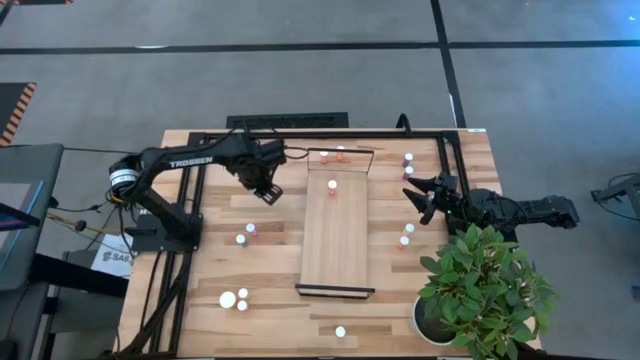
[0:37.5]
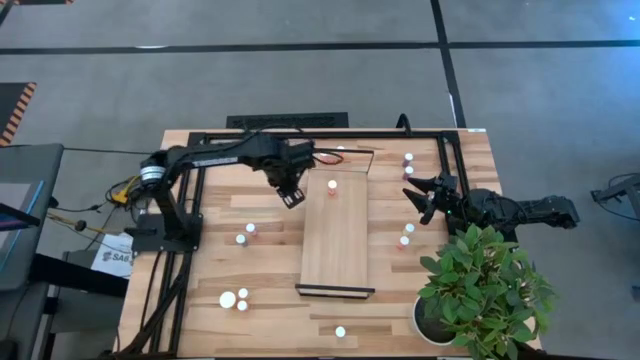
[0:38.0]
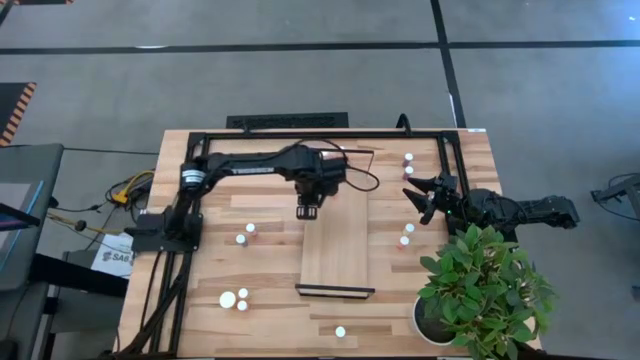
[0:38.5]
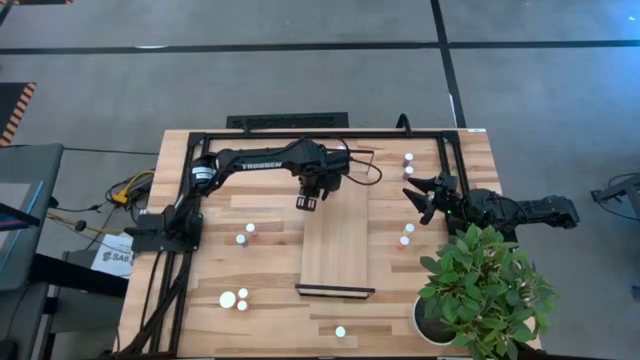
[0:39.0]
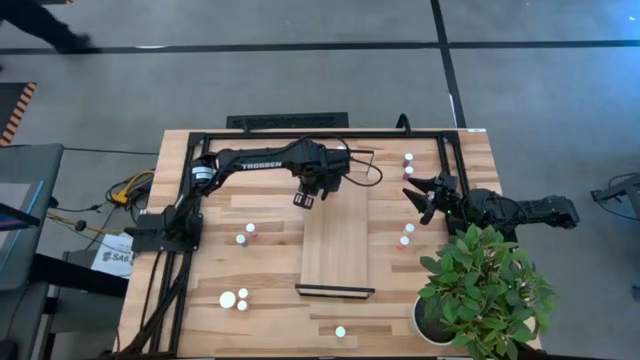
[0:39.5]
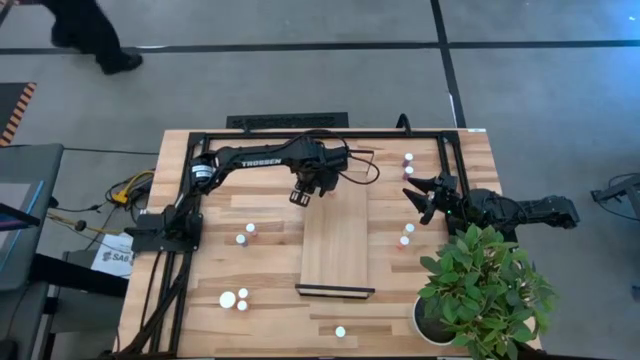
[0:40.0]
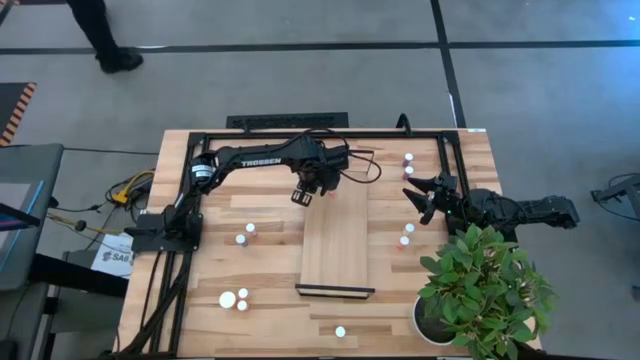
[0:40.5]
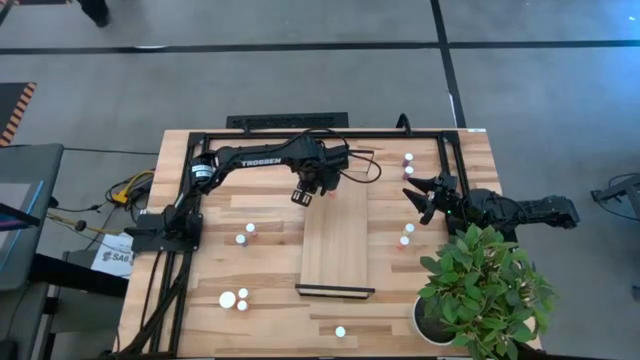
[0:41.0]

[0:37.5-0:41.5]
Task: Pick and place medicine bottles onto shelf by color
Put the yellow pill bottle on the shelf

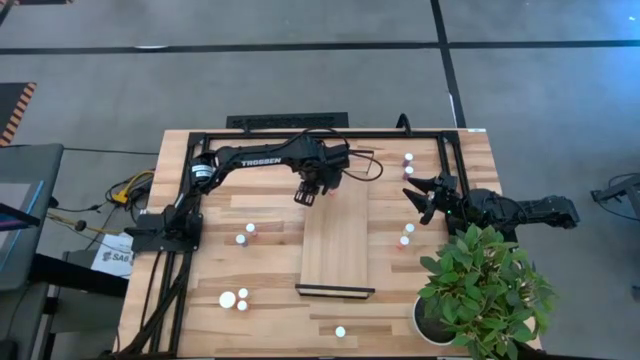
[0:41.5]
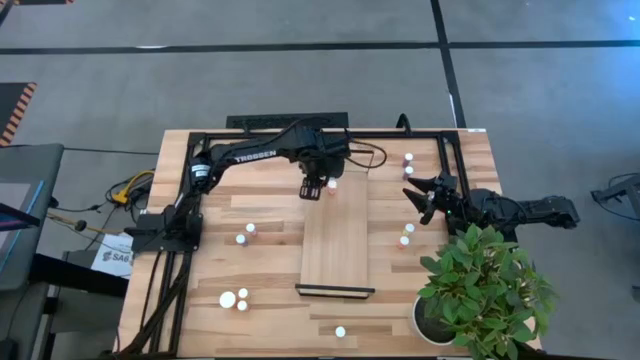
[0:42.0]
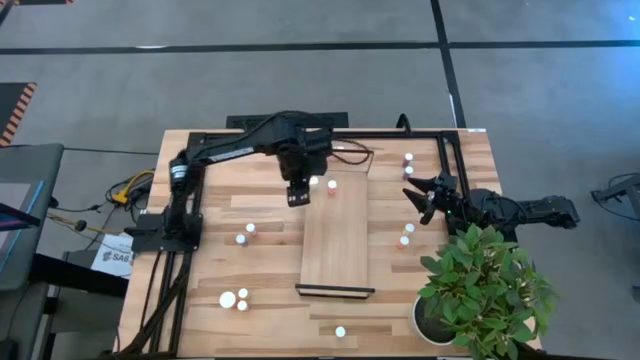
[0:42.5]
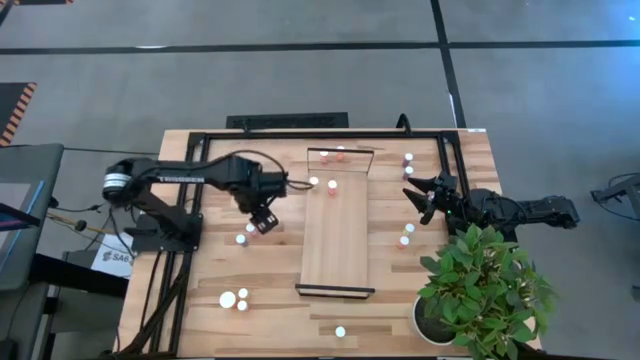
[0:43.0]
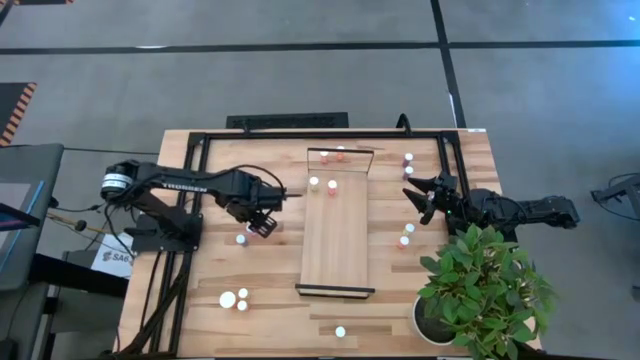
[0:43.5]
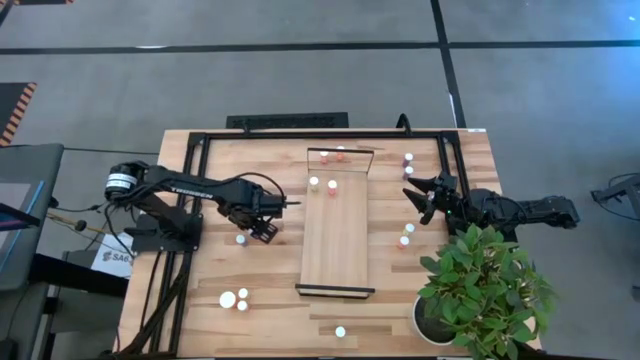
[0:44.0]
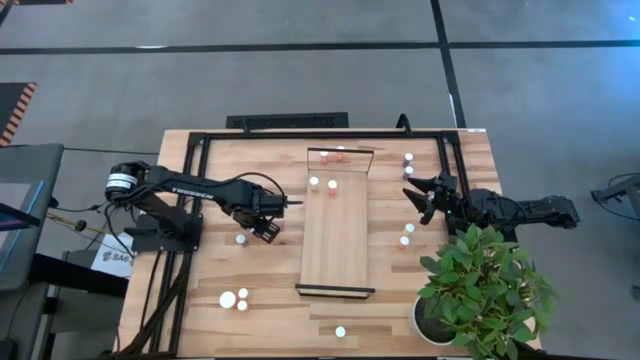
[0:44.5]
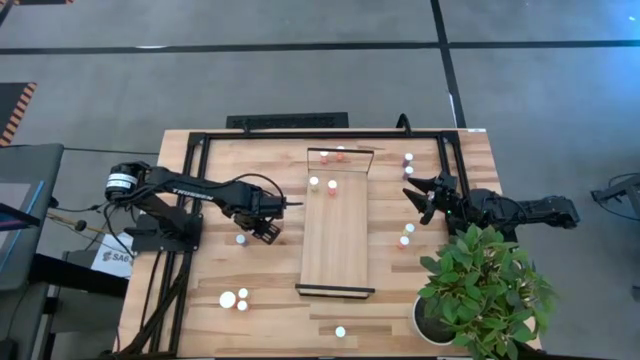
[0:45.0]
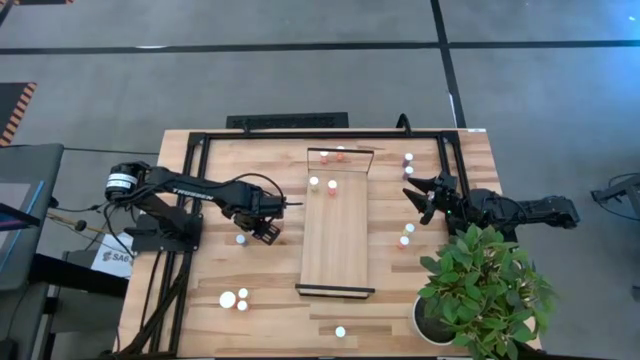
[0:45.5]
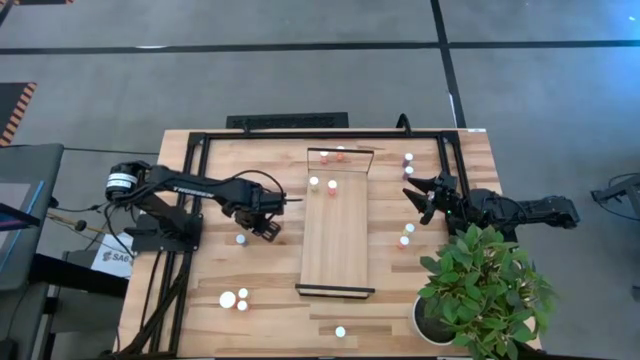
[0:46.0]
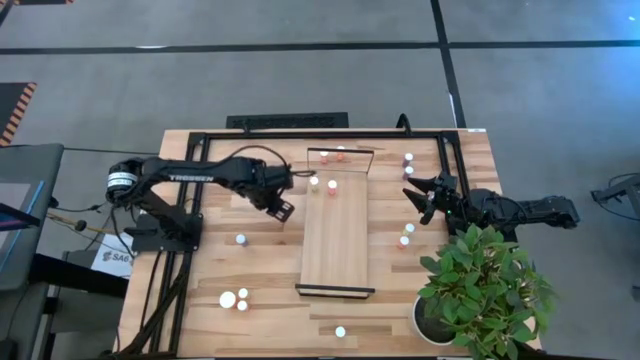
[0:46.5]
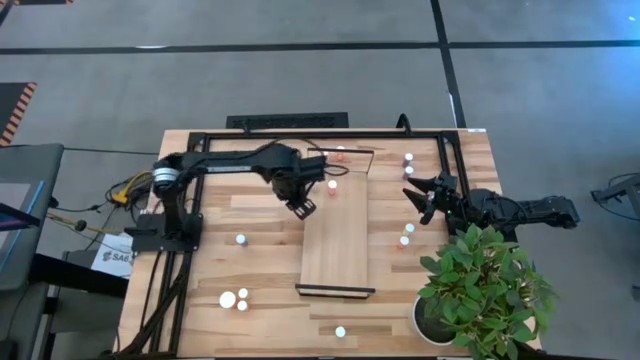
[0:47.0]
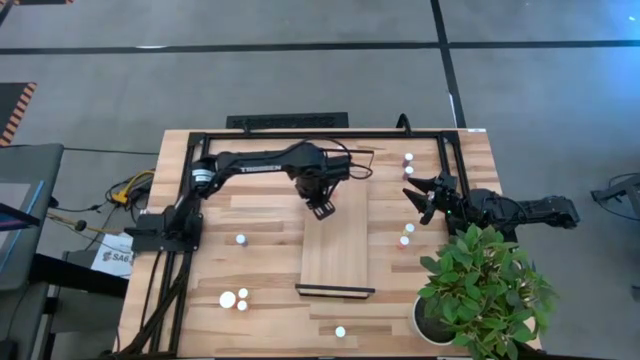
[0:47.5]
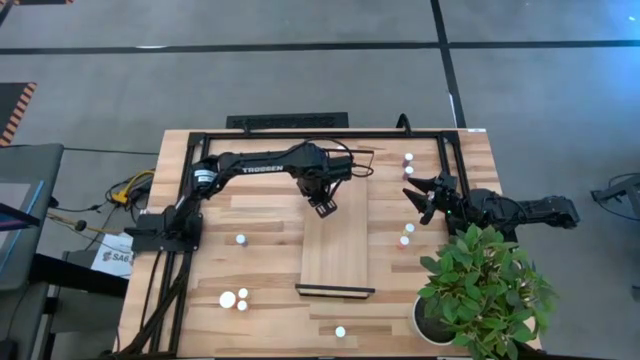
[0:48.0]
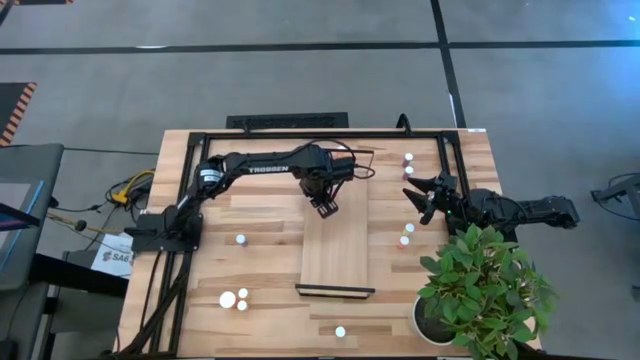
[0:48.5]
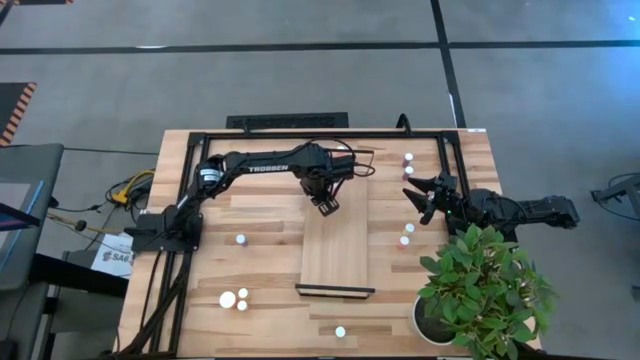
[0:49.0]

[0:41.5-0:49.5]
Put the pink pill bottle on the shelf

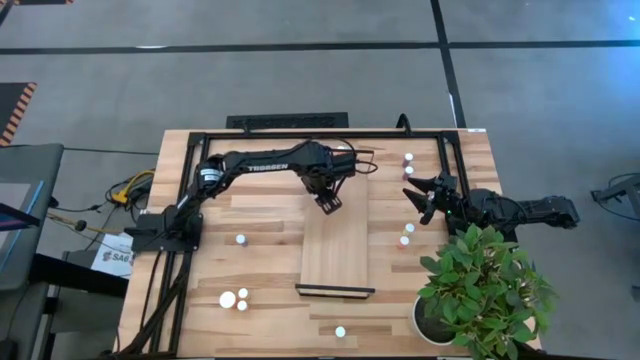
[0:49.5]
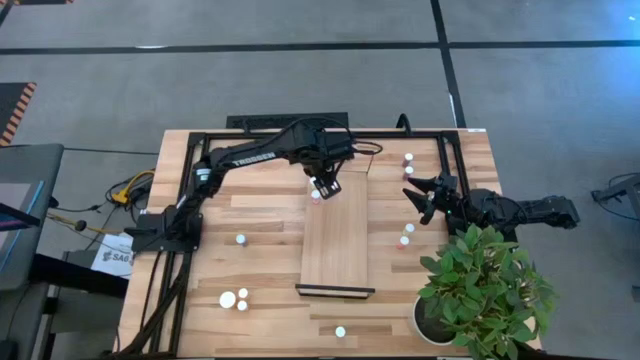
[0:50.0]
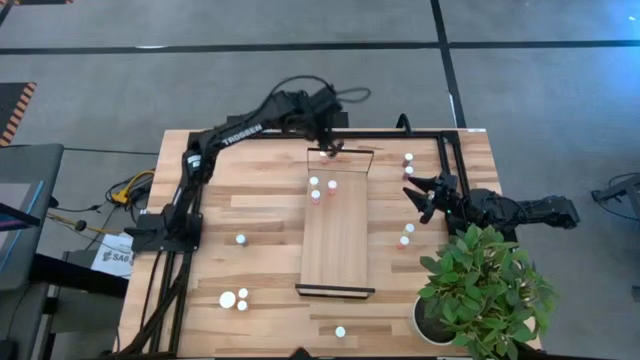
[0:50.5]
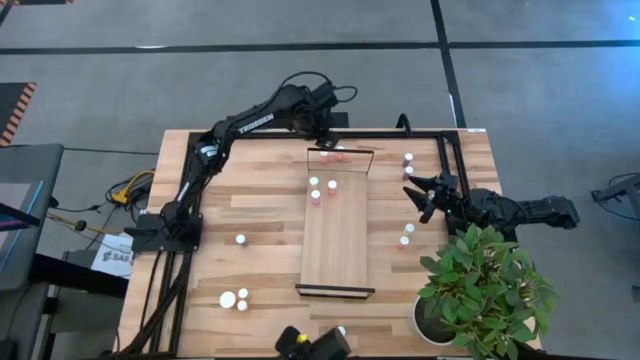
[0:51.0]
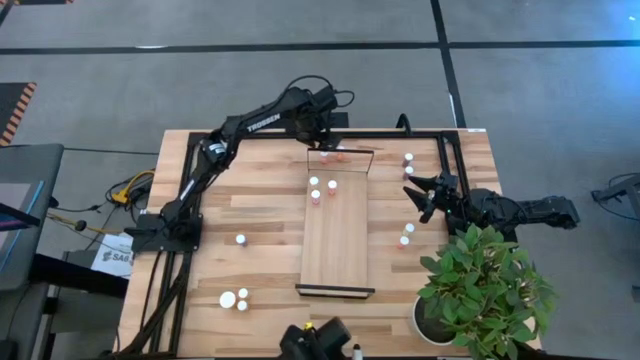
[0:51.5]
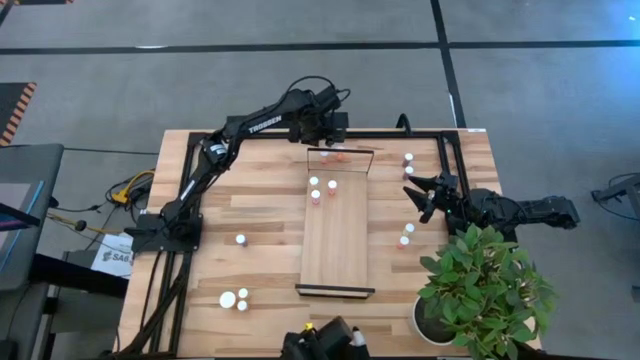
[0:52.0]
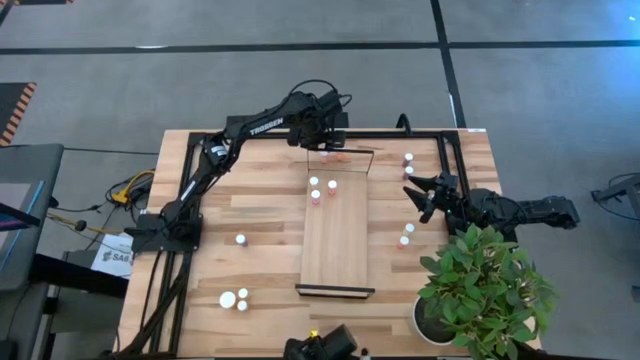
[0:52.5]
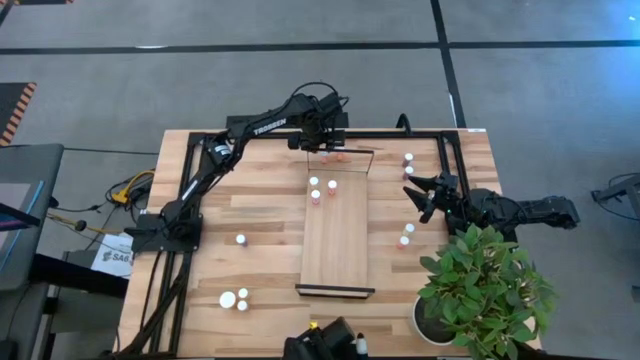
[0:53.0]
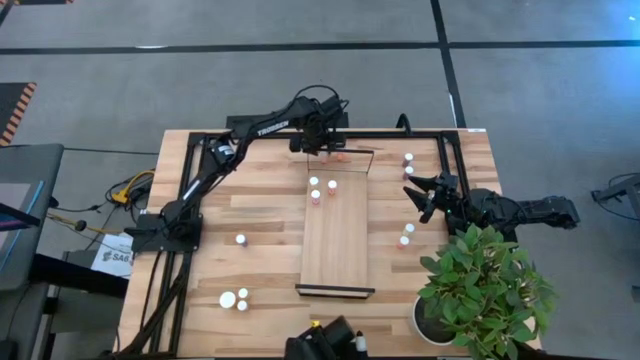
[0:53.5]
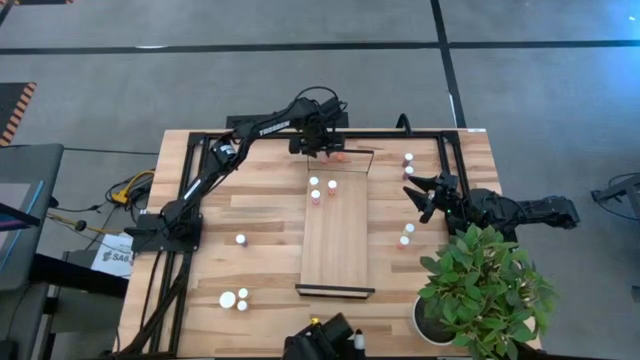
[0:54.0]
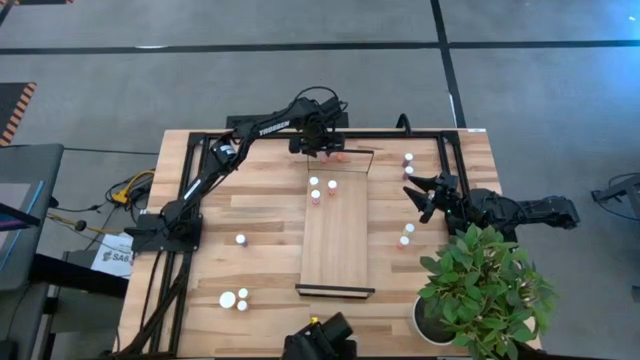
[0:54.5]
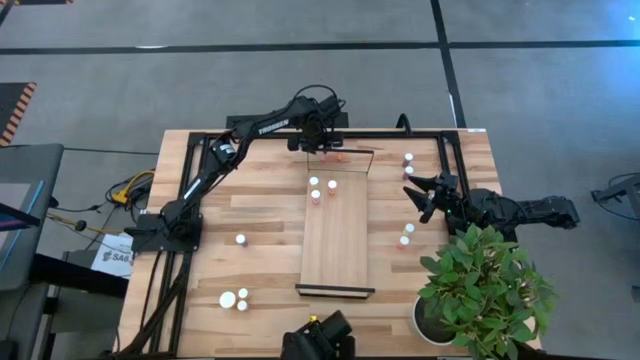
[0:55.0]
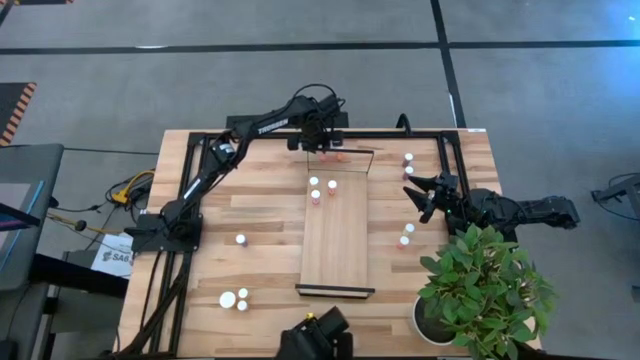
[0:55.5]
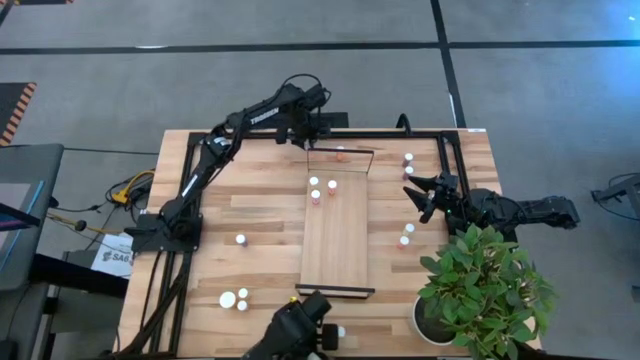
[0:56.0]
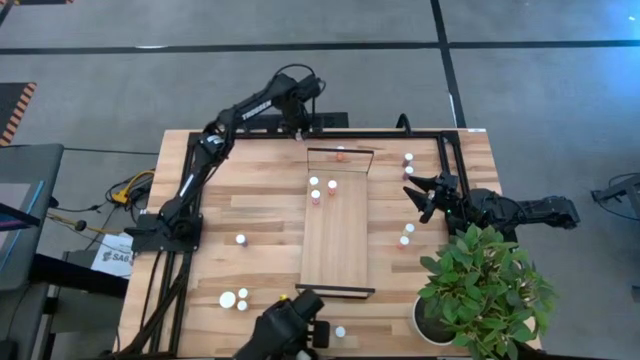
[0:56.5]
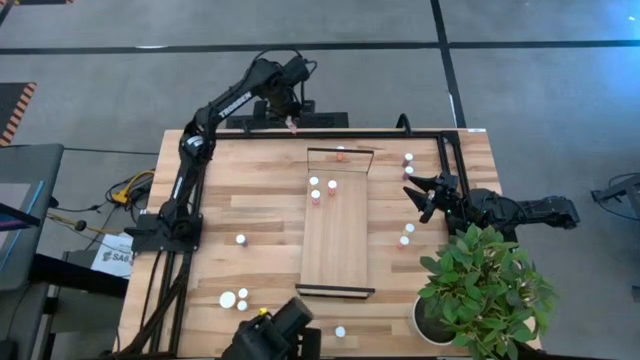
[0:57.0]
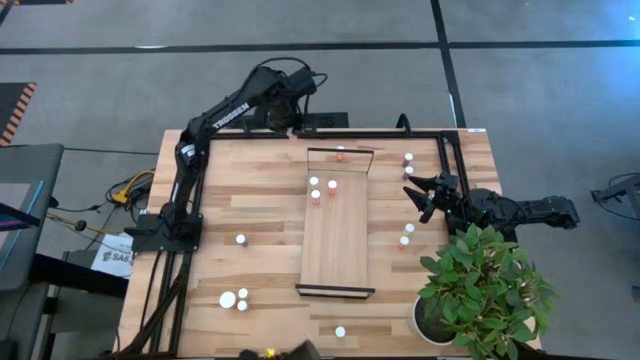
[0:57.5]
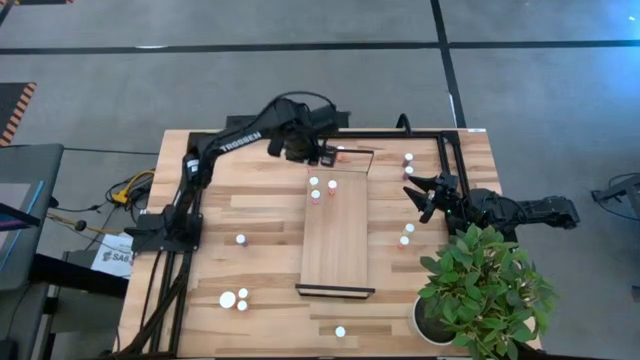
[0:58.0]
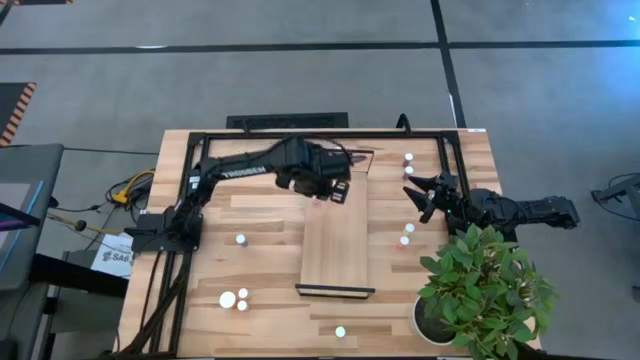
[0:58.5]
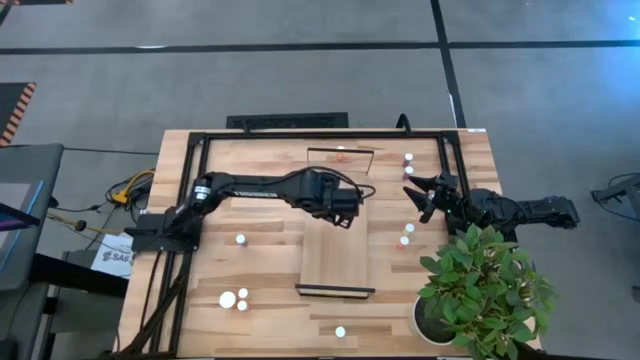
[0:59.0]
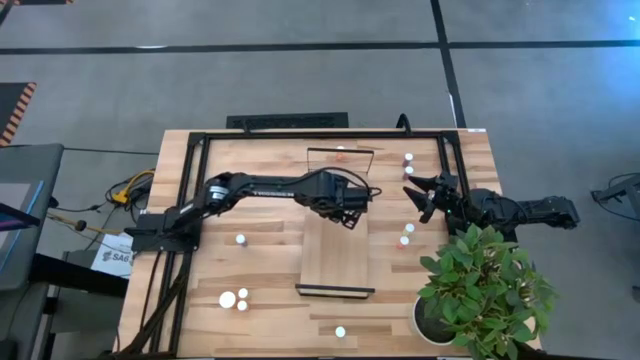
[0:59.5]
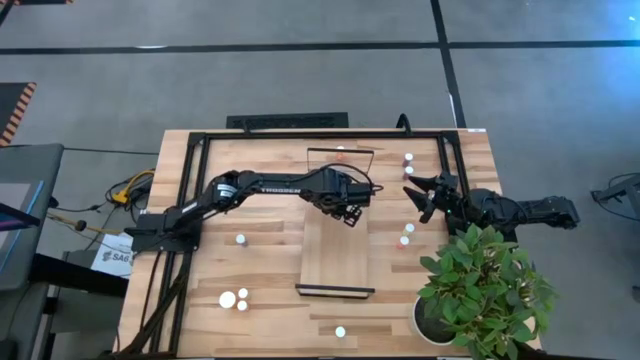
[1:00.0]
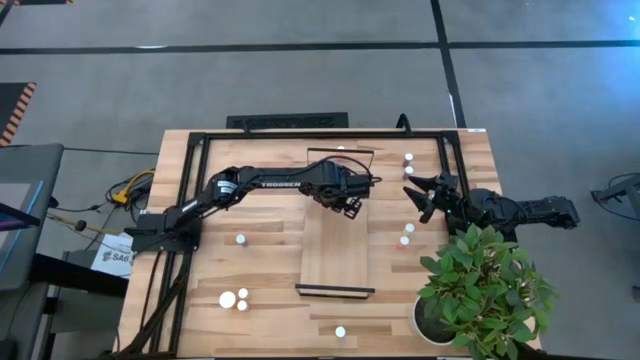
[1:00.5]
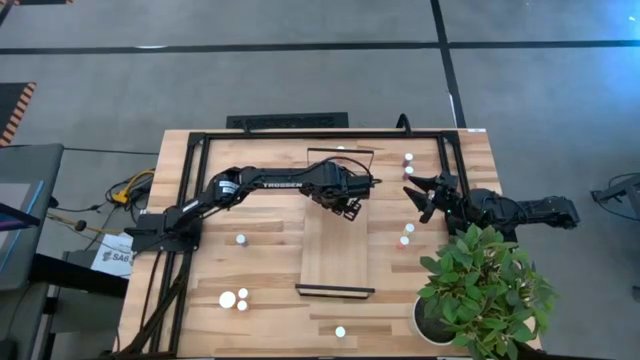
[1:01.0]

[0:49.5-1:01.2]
Put the purple pill bottle on the shelf
